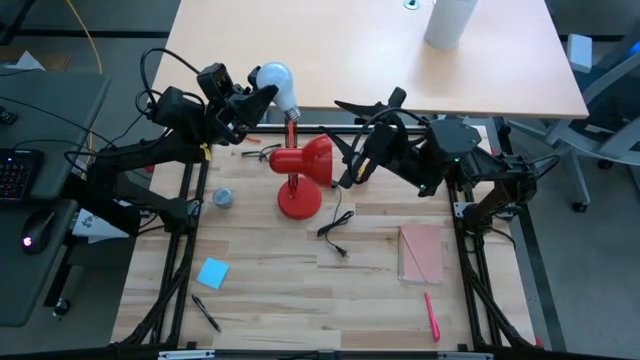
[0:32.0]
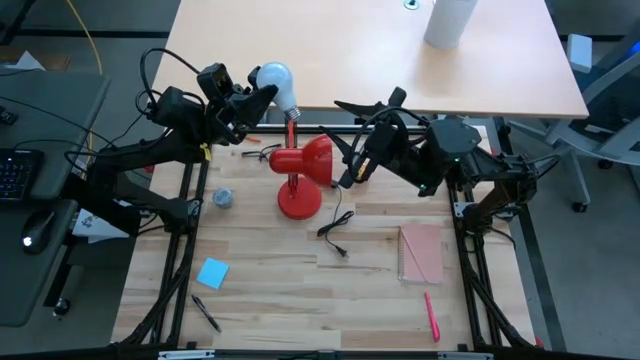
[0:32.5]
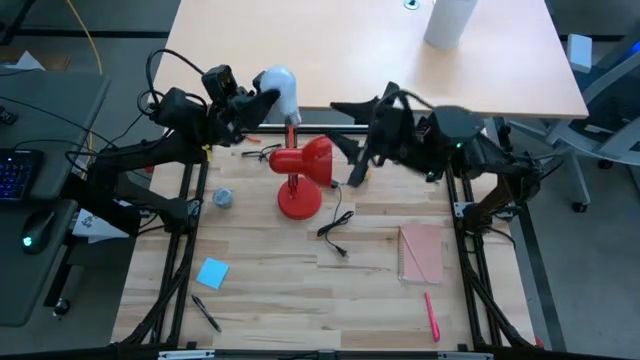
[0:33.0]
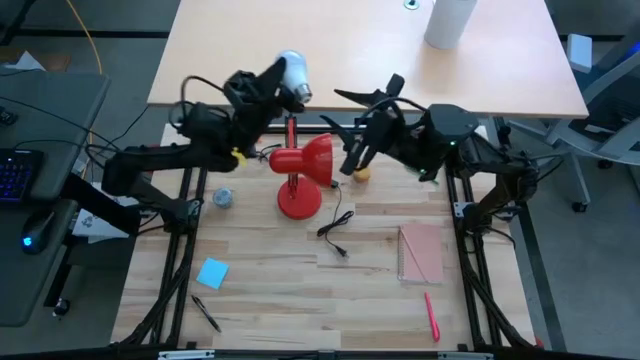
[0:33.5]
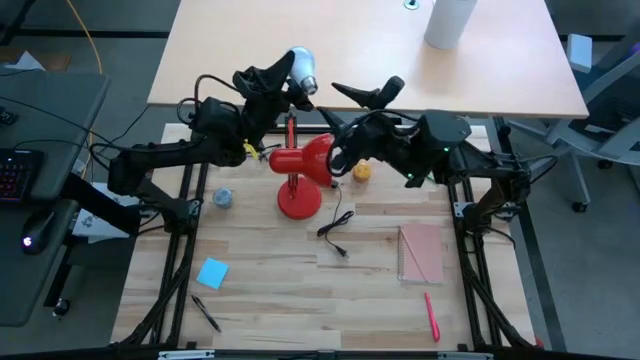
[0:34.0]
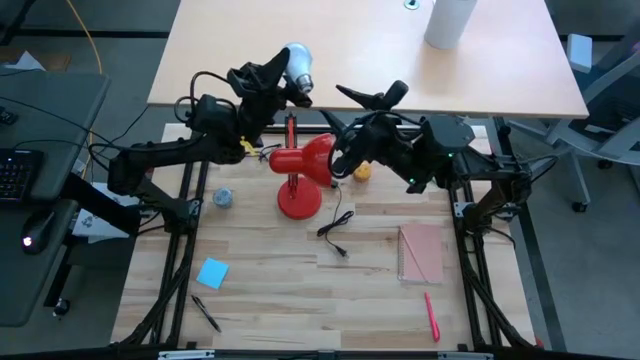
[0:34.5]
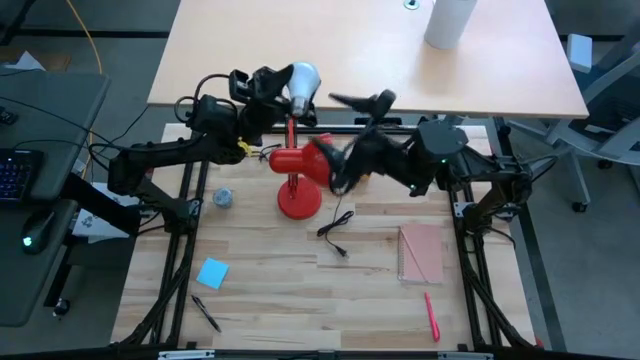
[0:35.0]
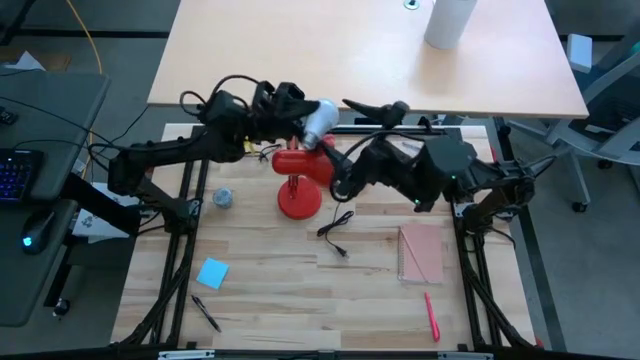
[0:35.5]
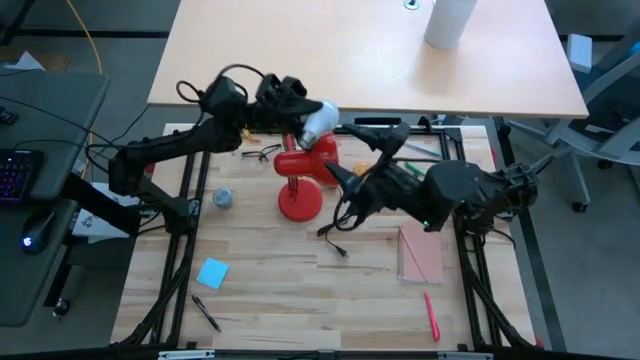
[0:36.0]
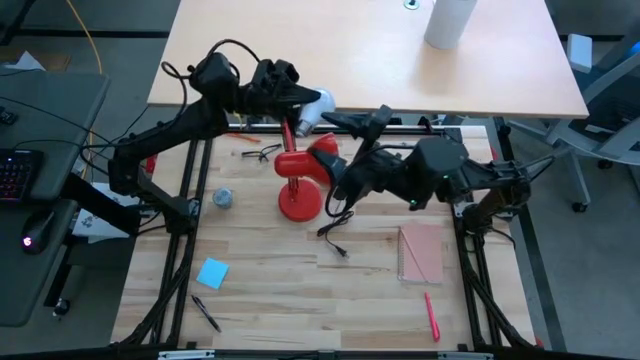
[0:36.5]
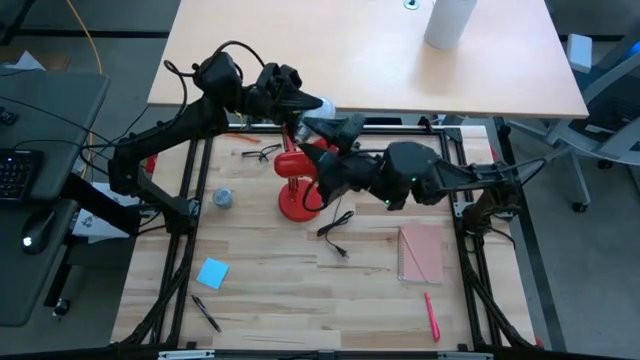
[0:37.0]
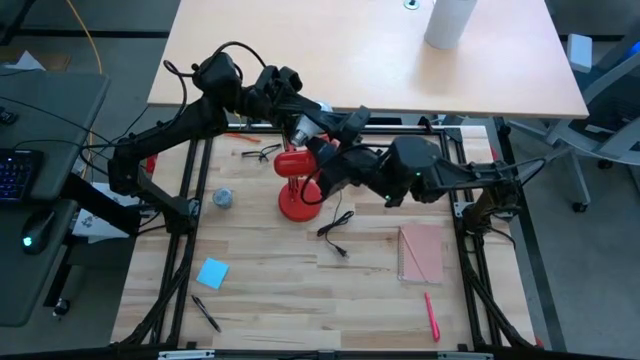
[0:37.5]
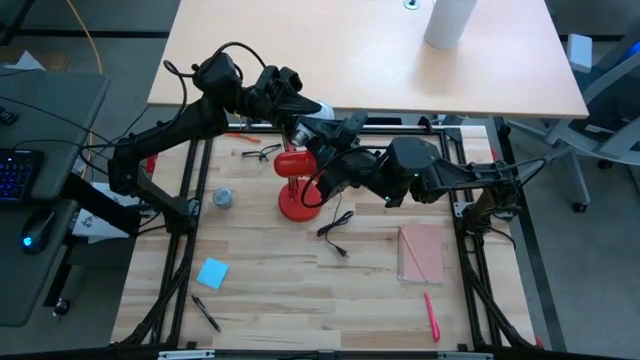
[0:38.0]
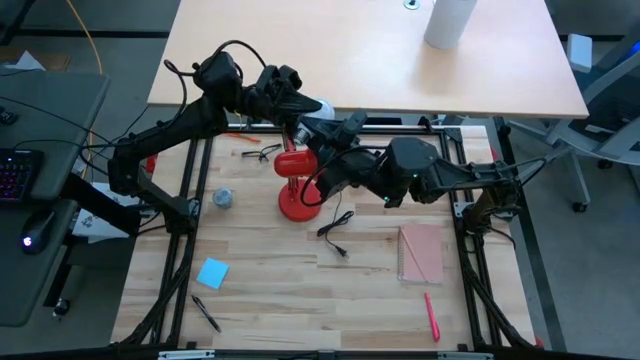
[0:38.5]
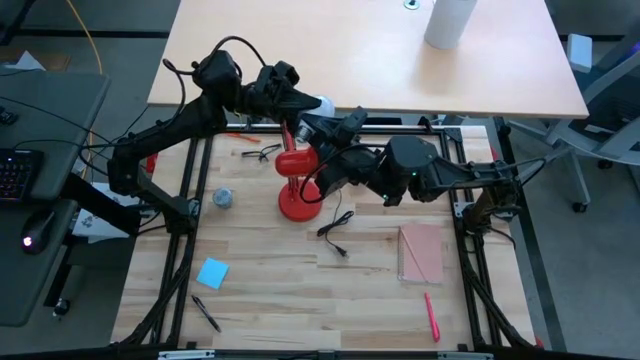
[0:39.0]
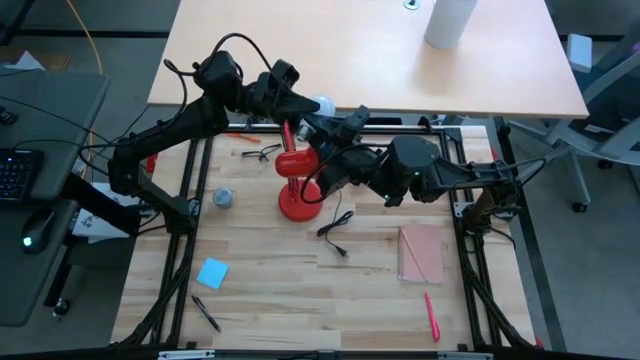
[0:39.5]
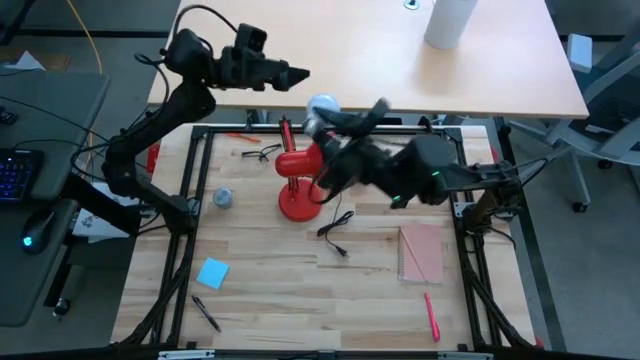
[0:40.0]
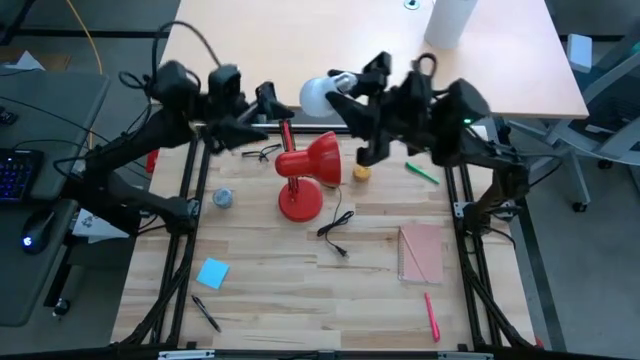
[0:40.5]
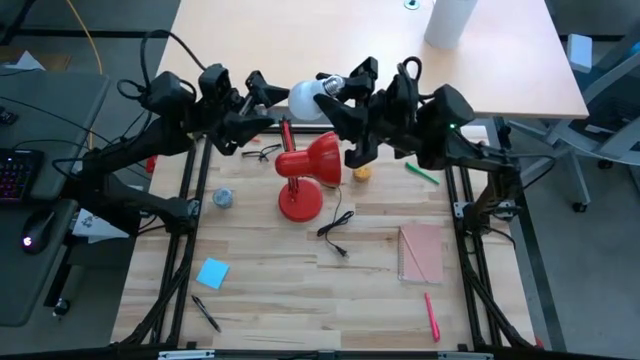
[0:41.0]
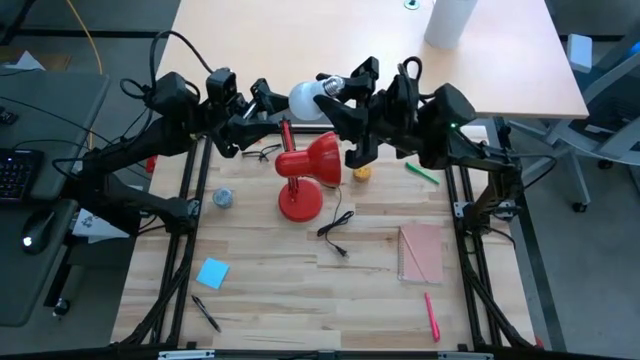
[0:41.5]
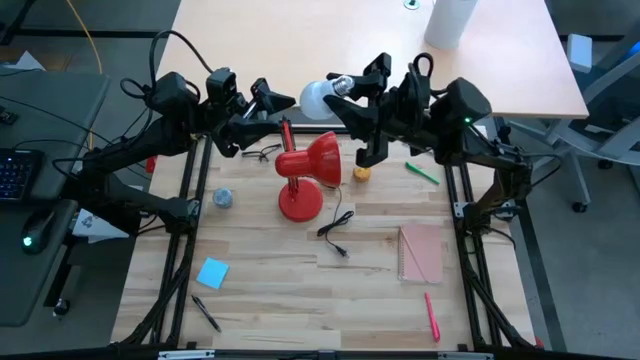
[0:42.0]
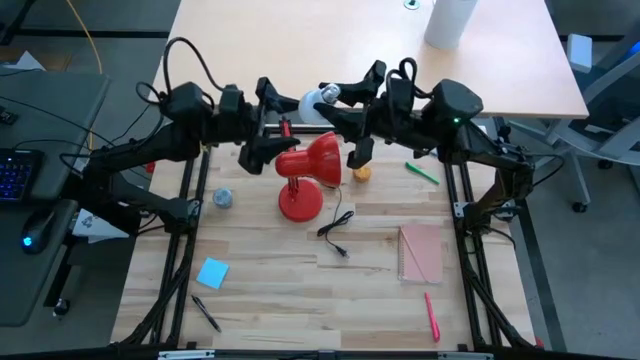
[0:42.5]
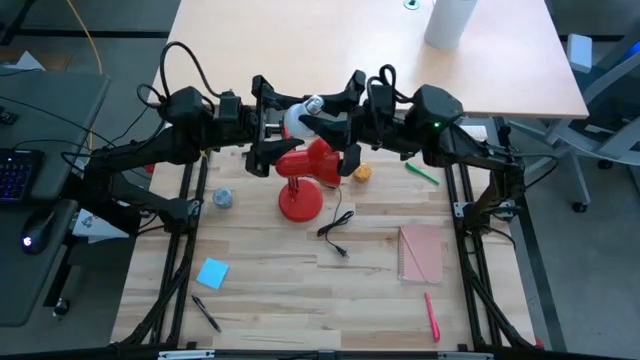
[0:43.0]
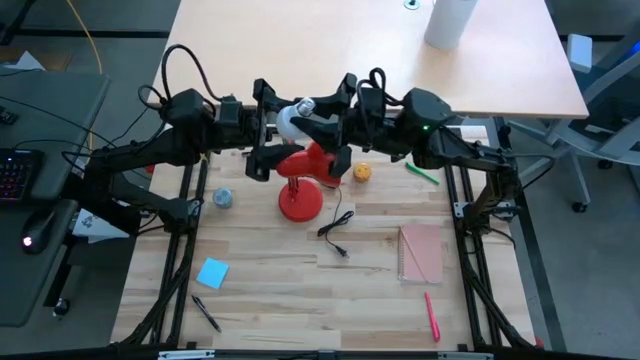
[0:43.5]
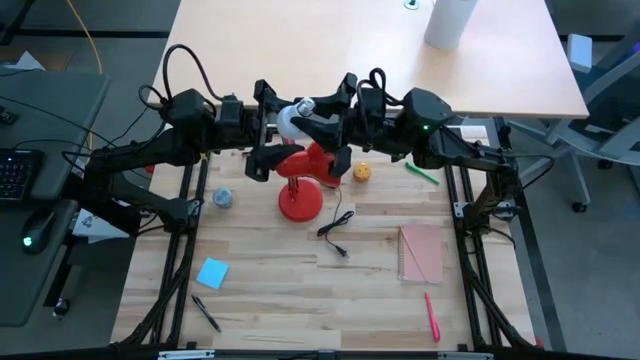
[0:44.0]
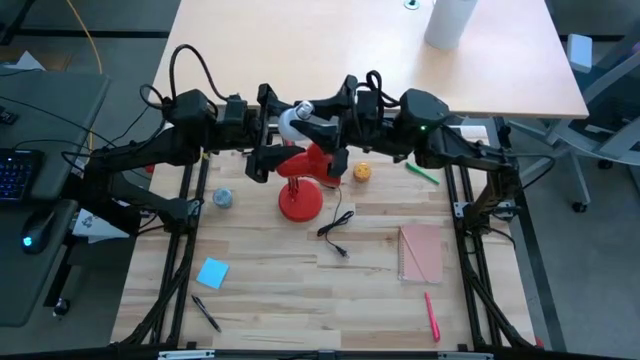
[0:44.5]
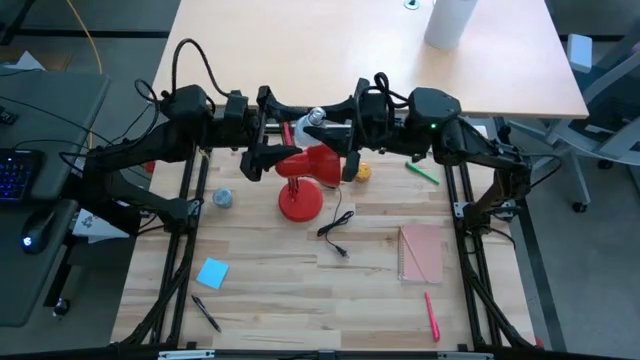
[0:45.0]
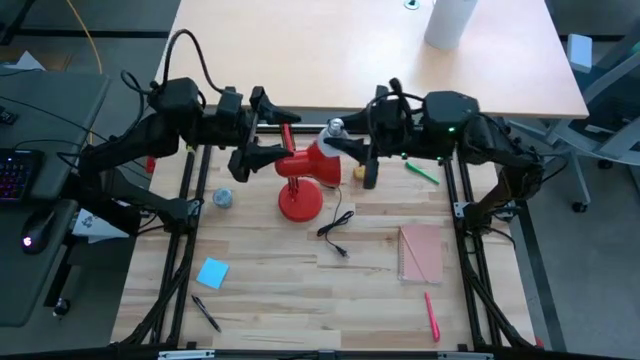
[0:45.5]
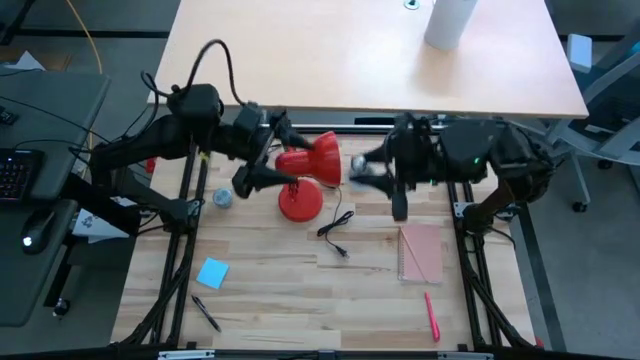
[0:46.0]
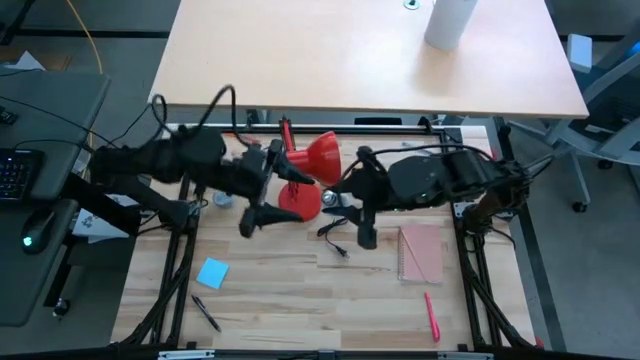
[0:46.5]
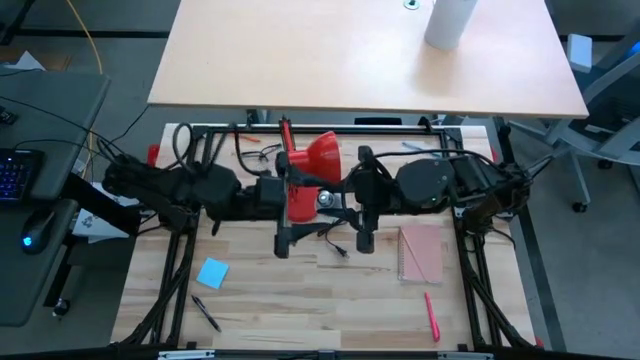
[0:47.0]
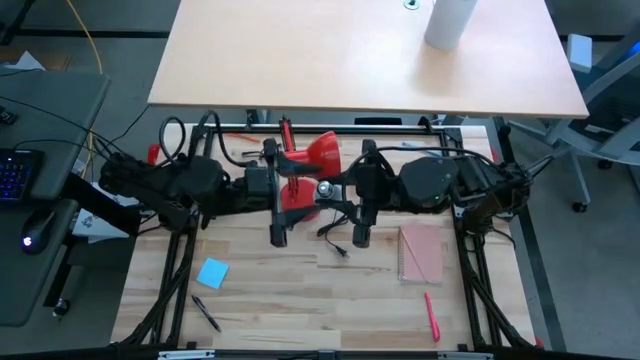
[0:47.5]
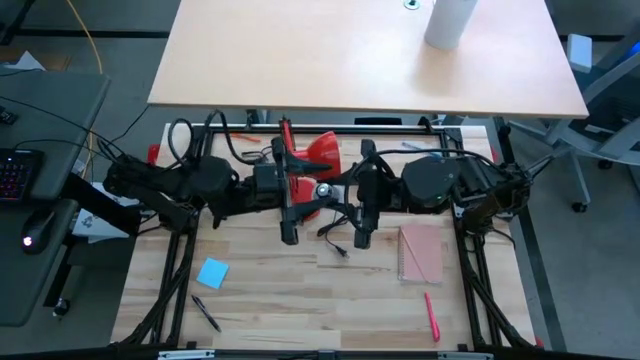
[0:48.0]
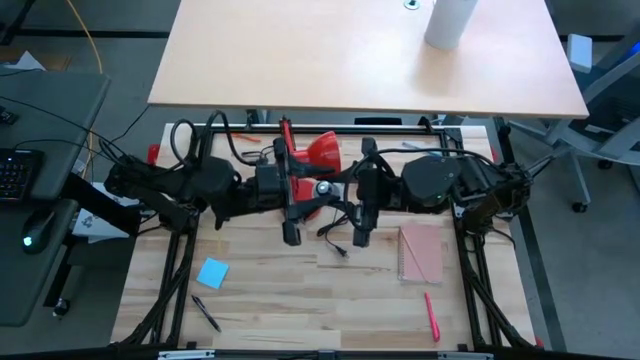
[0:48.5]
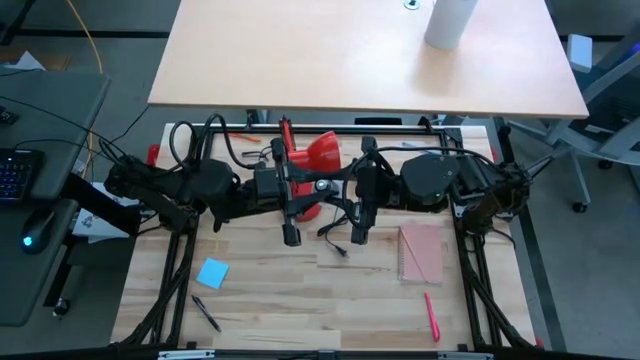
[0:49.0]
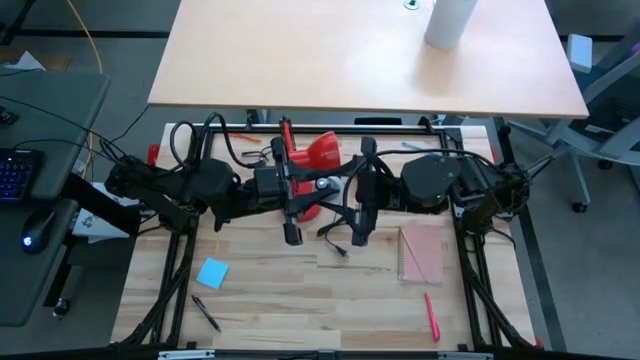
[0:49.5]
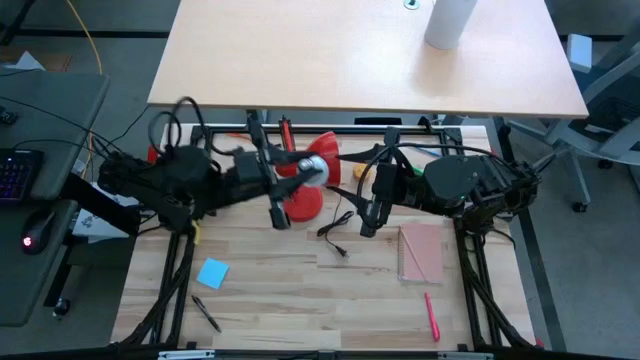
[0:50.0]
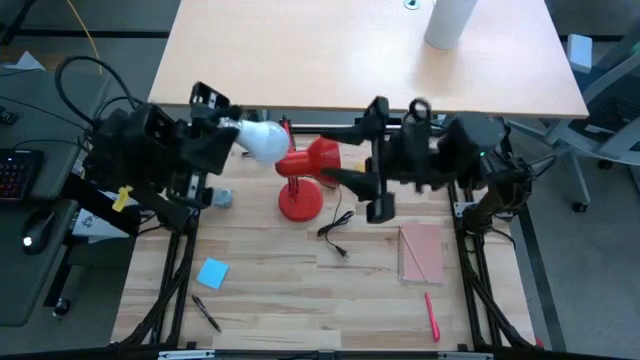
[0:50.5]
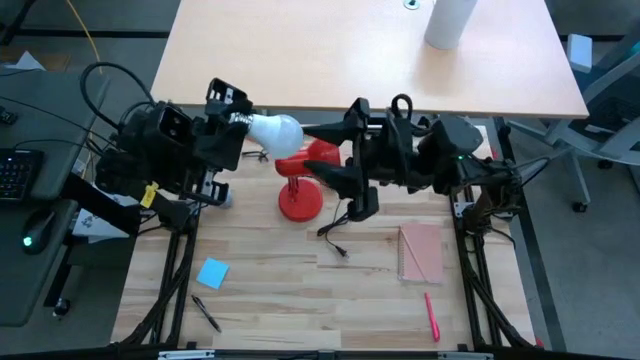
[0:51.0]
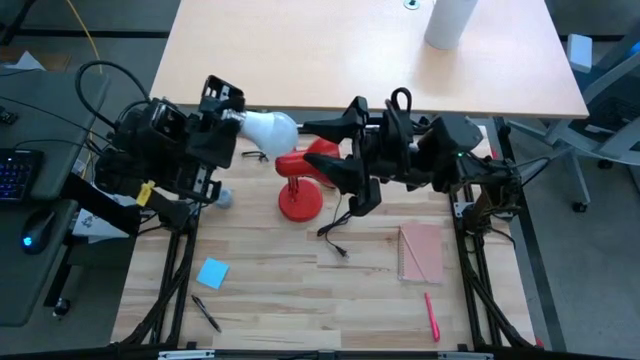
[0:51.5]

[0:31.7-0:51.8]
Task: Screw lightbulb
Insert the lightbulb into the lamp
